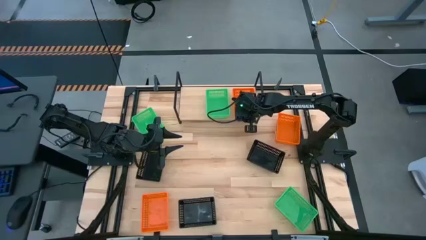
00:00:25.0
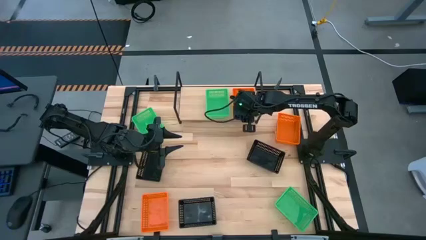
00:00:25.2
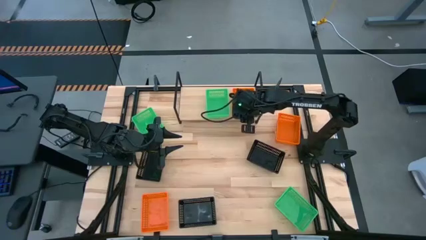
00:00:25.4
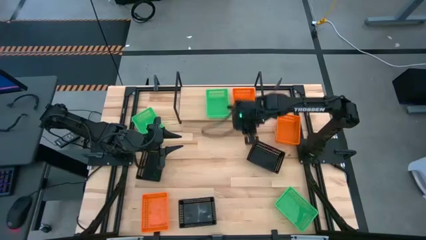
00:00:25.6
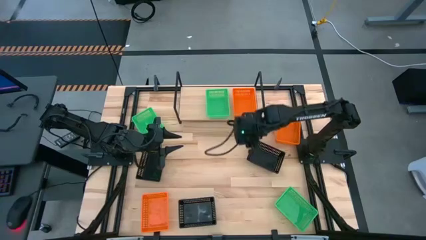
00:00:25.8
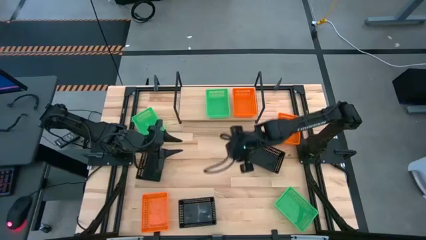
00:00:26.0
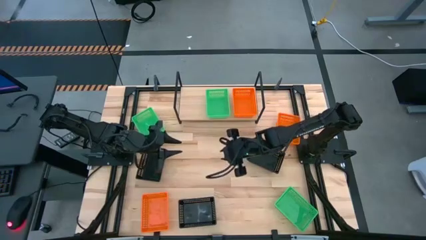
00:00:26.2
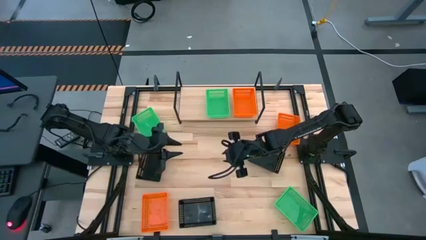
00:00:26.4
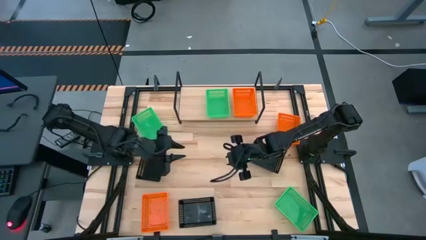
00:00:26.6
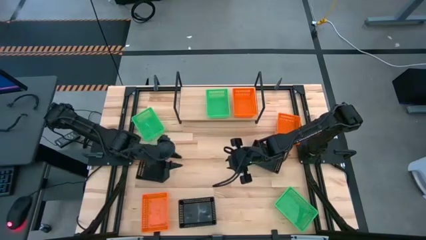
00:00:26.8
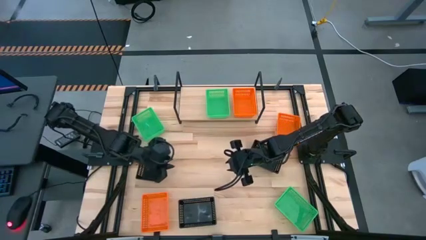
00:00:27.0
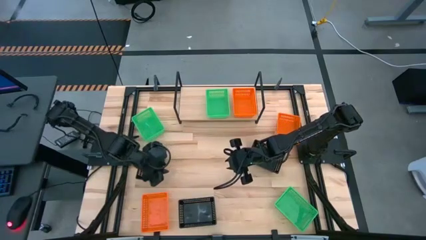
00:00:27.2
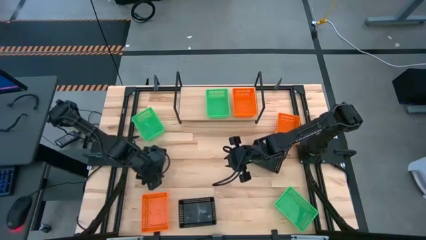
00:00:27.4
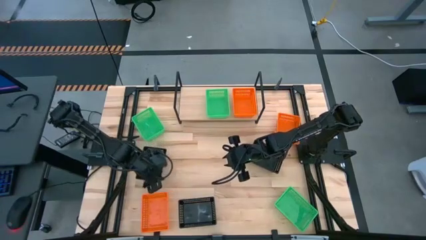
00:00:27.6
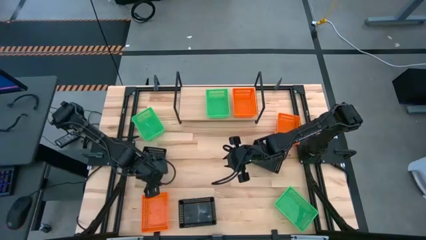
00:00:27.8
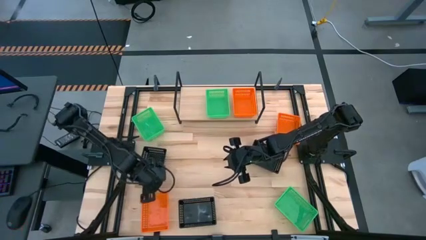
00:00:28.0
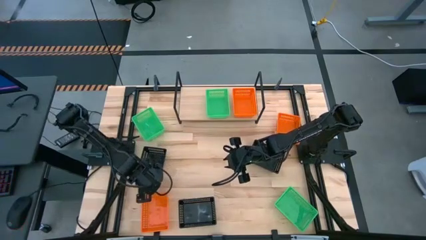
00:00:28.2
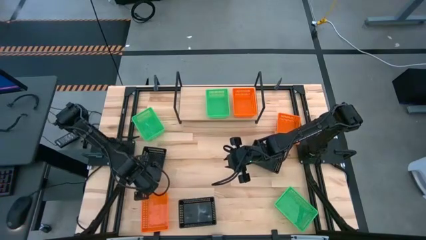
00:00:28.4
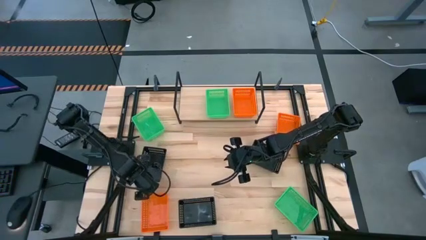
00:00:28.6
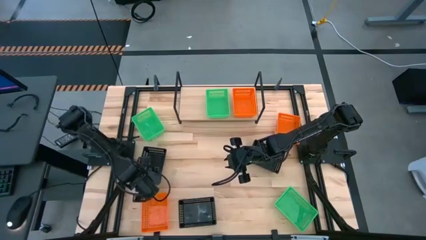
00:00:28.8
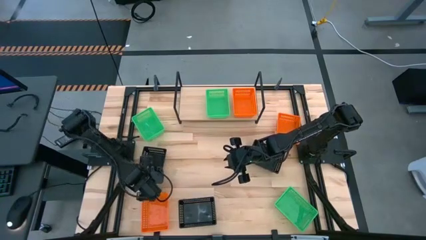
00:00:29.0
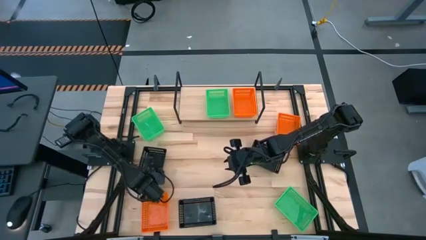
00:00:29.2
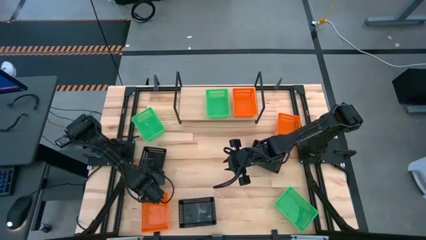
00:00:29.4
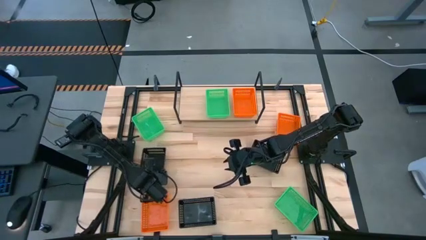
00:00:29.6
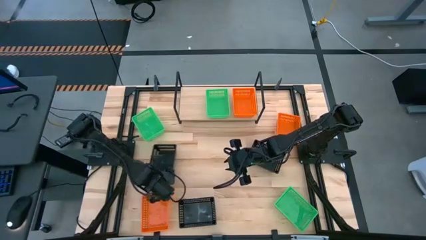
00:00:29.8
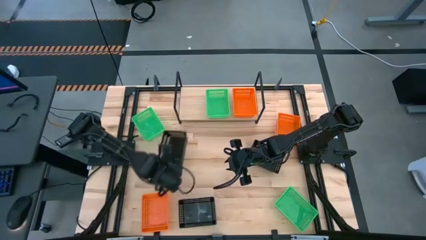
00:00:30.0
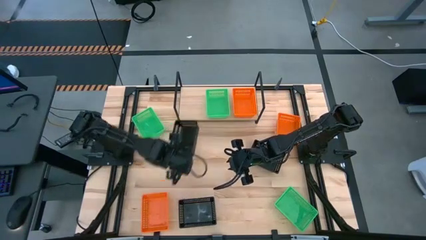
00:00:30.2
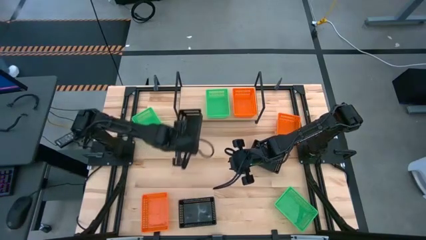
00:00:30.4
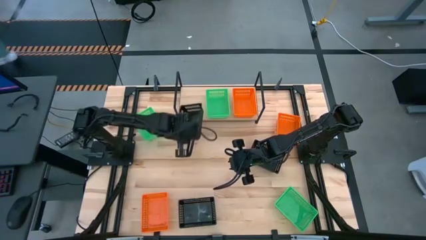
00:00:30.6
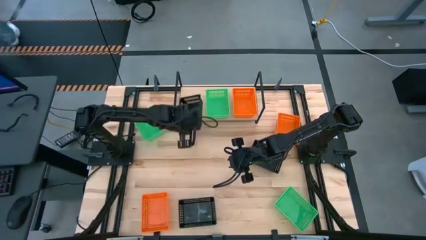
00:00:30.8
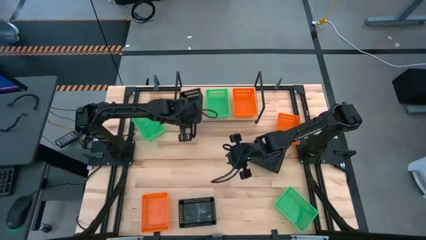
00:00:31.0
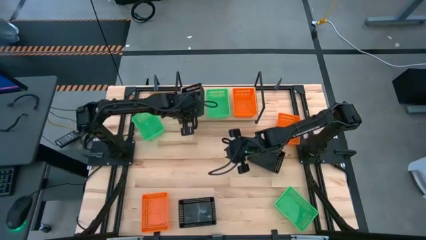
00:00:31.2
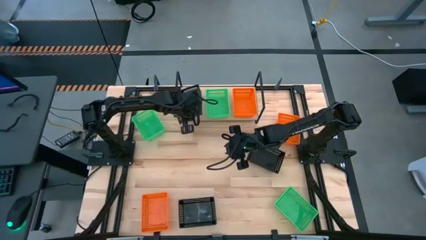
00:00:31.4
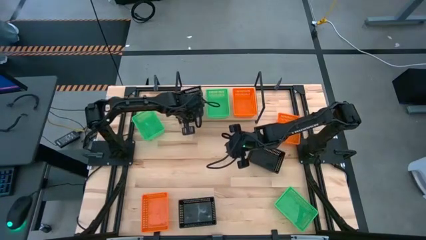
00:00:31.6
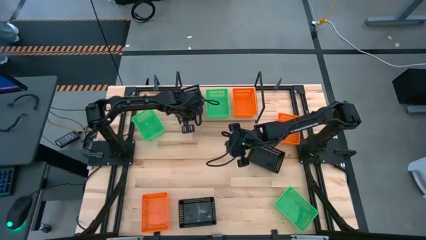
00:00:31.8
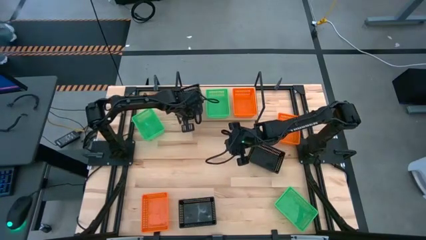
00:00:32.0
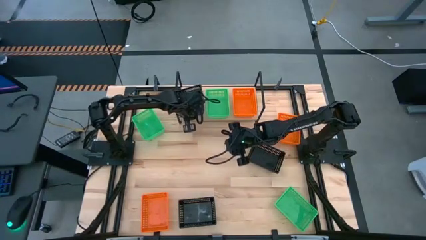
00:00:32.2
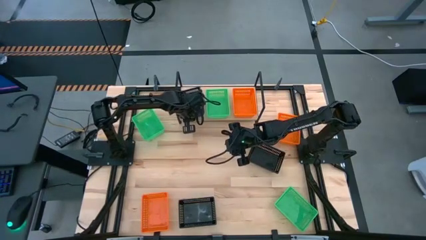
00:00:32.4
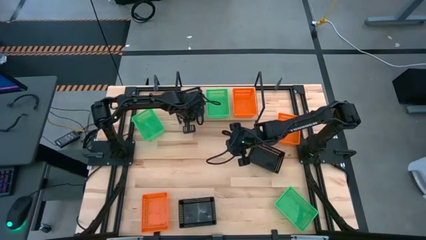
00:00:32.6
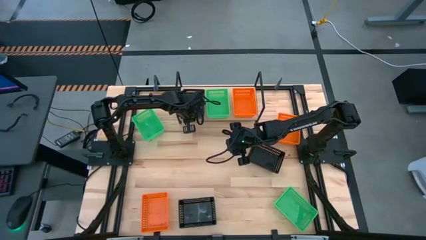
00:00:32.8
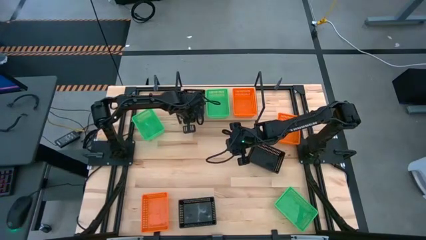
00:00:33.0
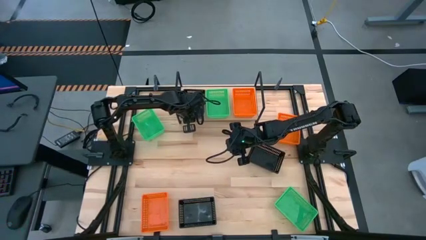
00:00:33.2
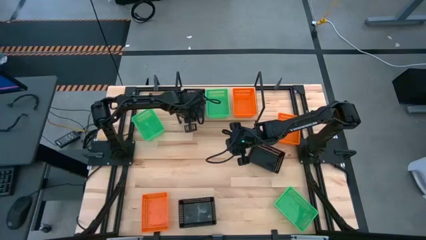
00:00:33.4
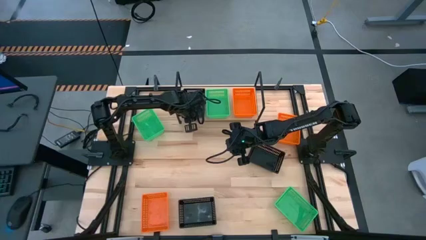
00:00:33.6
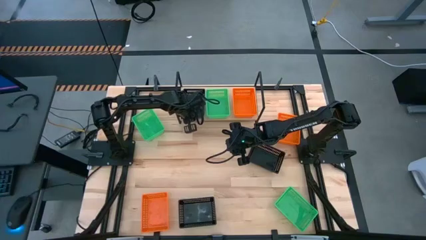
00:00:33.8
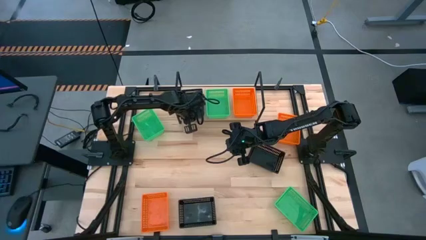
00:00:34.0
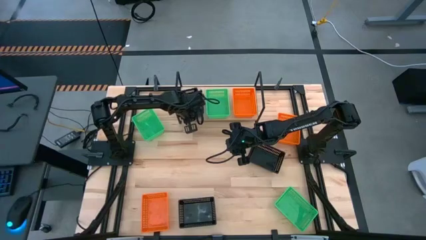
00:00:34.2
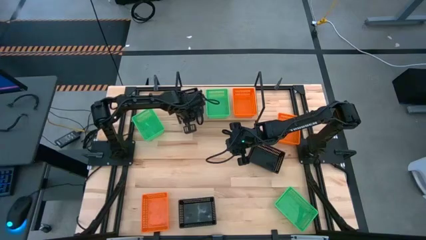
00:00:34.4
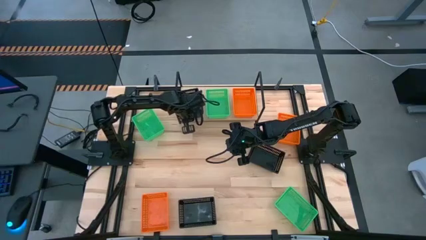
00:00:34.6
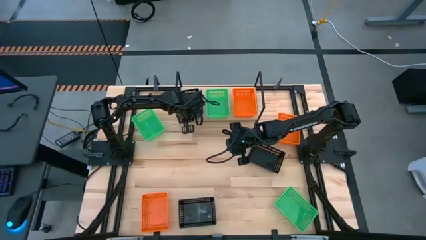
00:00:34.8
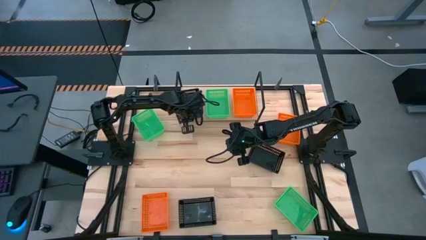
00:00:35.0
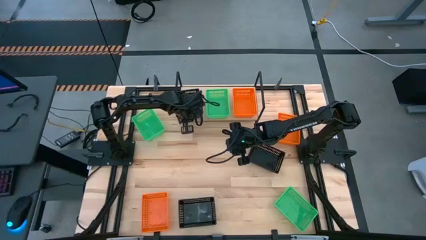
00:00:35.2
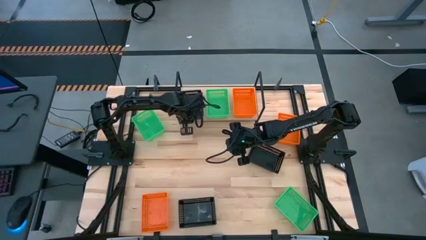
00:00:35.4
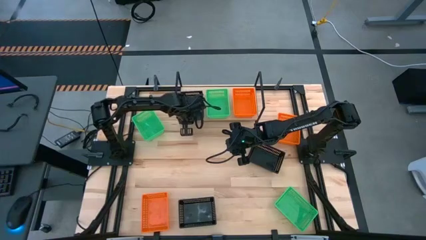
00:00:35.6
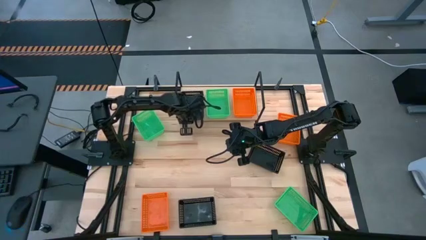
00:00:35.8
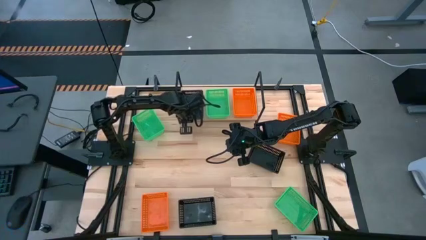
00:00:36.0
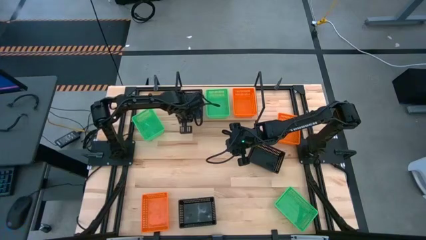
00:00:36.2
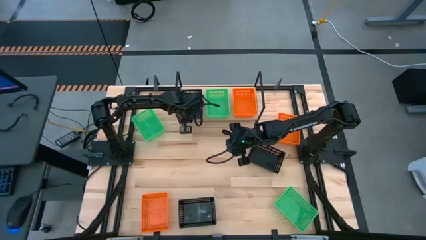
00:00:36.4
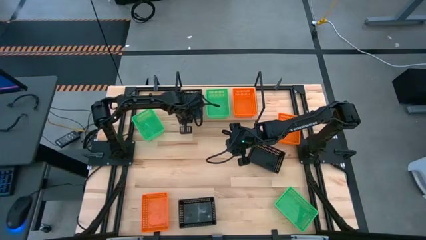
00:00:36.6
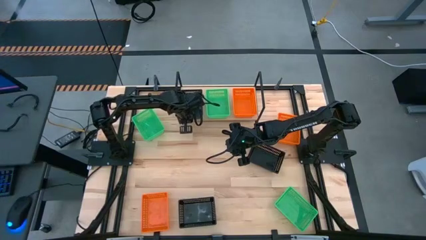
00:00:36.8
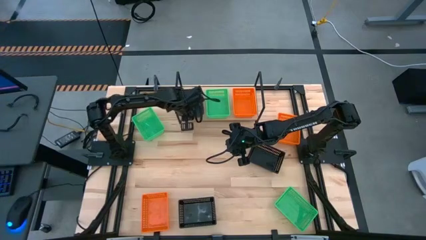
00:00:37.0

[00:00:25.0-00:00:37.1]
Task: Stack baskets on shelf by color
Put the top left black bin on the shelf
